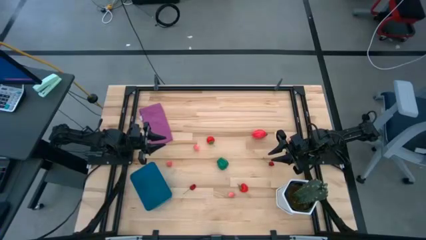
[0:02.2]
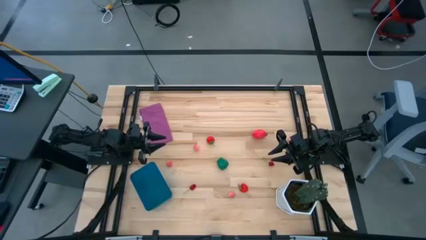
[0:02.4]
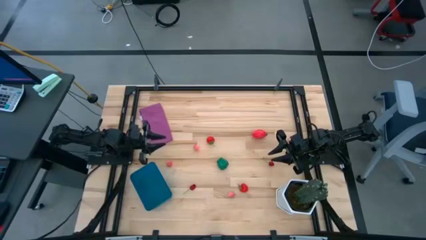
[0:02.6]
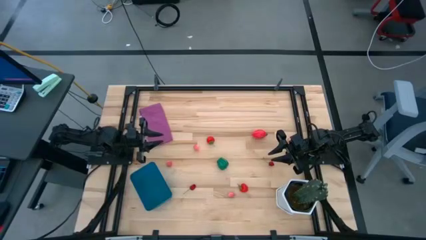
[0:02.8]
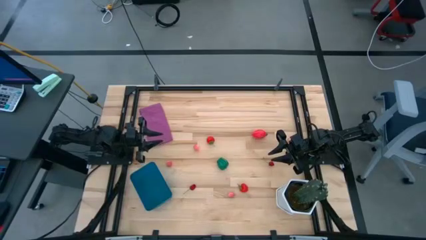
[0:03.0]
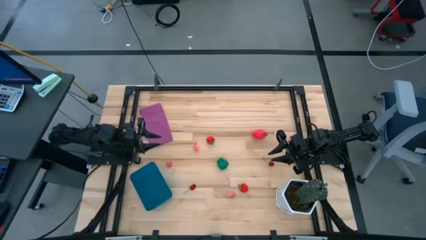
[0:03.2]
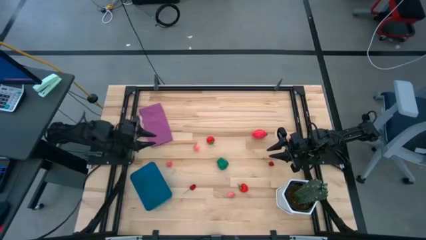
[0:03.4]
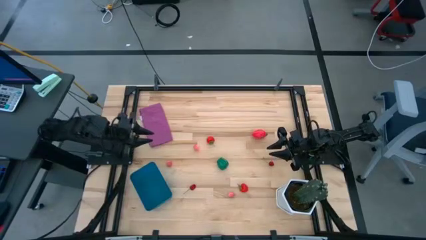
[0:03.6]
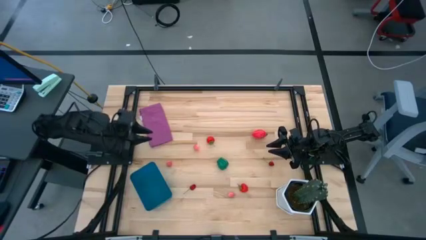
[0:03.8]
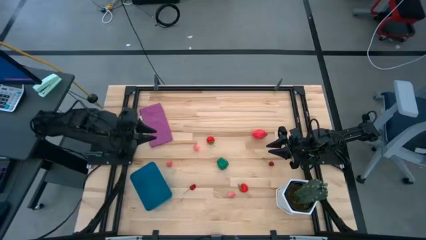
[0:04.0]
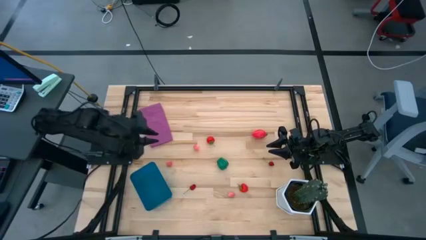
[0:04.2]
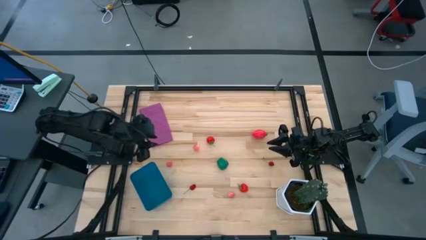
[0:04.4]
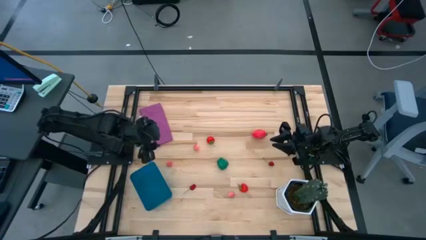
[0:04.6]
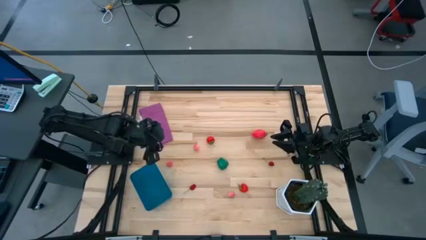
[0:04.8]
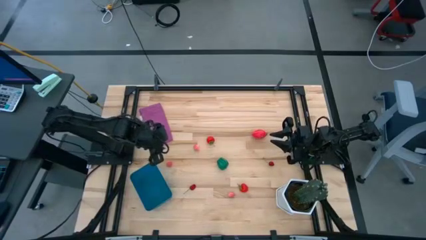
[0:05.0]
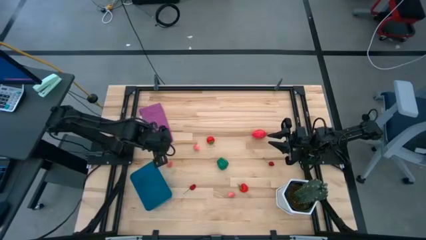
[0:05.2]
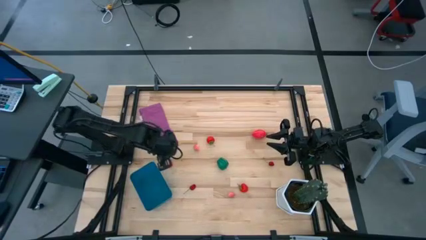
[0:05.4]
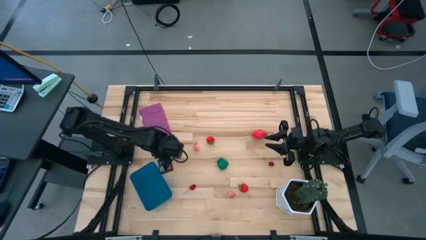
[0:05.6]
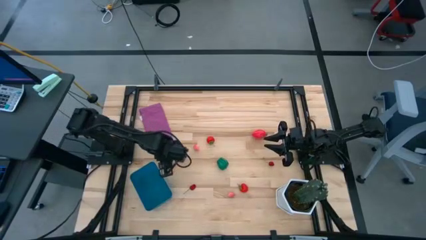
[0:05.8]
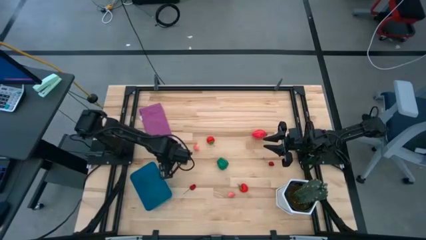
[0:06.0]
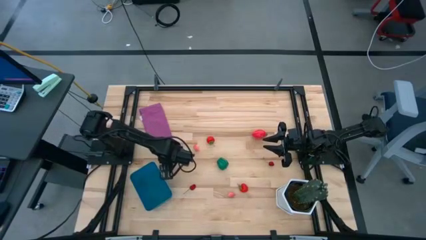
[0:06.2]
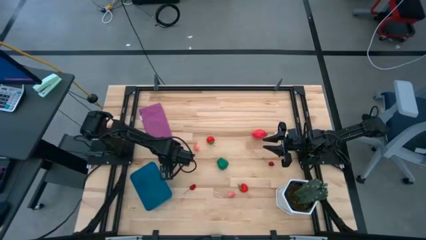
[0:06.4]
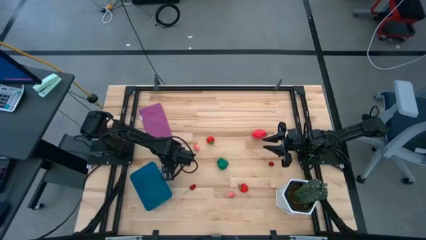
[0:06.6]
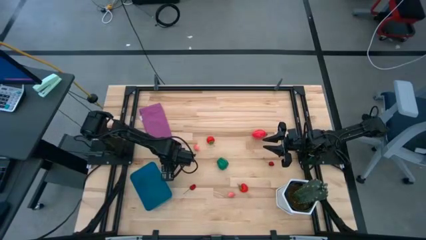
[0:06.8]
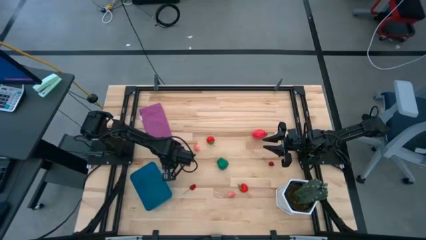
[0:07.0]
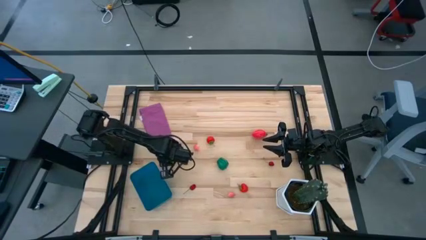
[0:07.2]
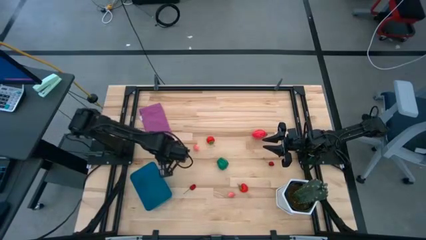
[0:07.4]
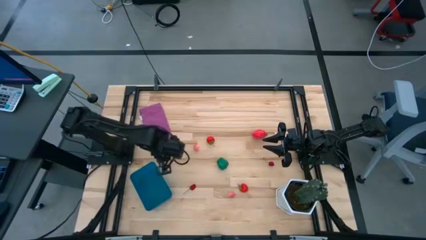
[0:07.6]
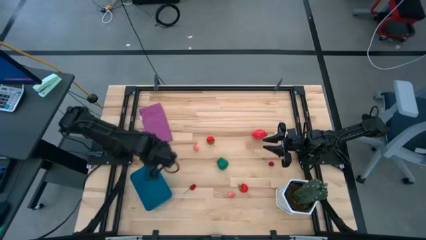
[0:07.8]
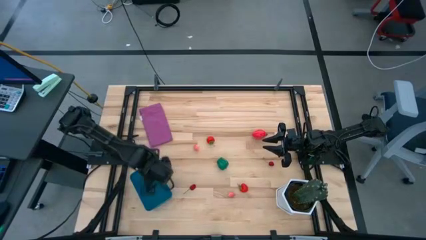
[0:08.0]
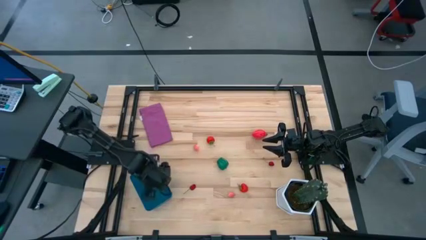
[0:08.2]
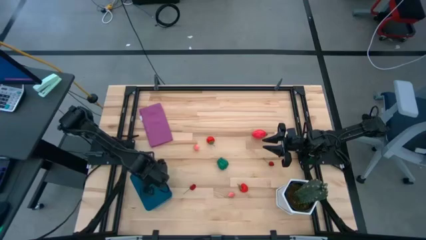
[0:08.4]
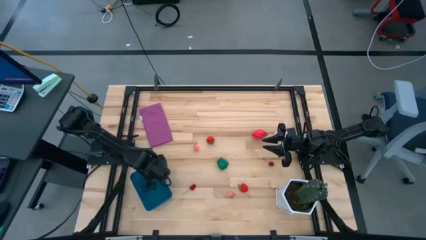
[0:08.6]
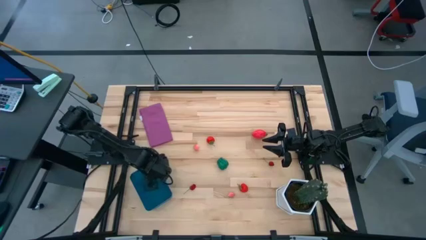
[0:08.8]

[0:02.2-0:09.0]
Task: Pick and placing Produce into tupperware
Put the peach into the blue bin

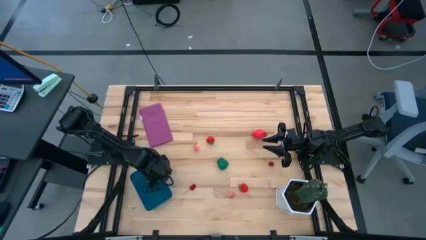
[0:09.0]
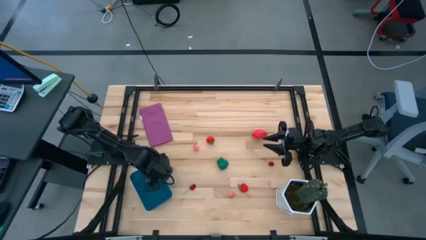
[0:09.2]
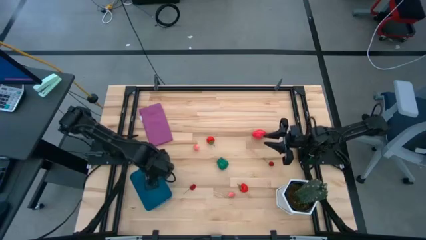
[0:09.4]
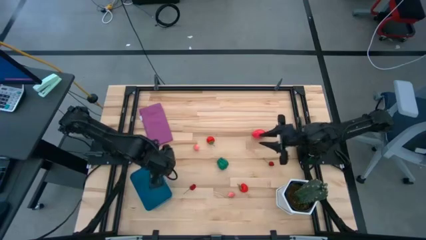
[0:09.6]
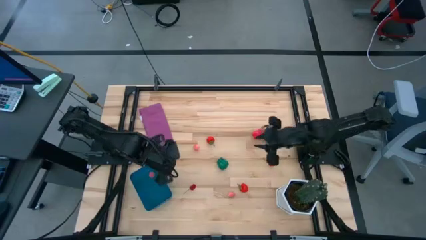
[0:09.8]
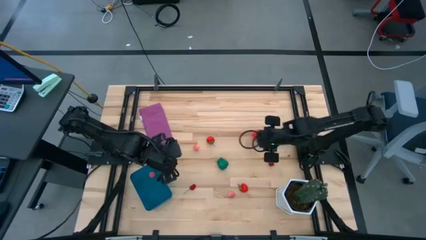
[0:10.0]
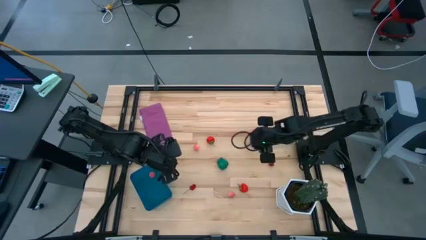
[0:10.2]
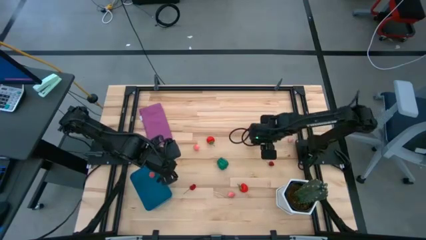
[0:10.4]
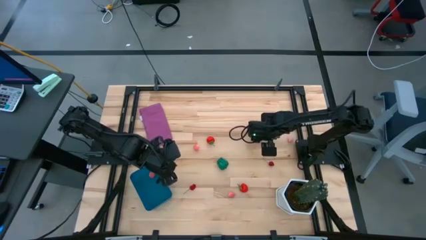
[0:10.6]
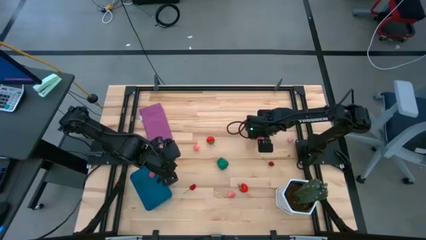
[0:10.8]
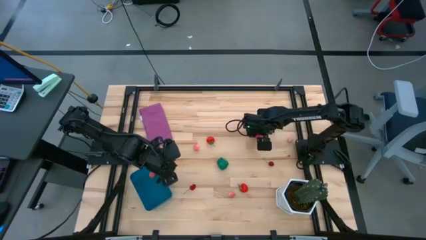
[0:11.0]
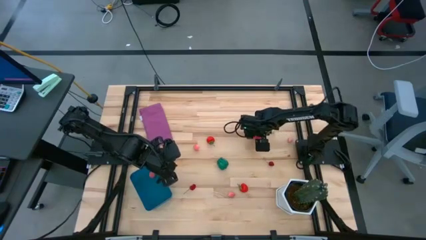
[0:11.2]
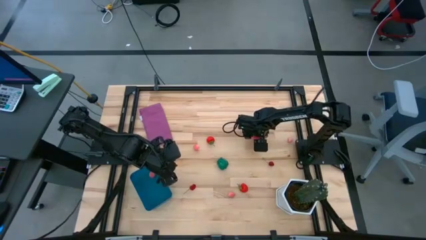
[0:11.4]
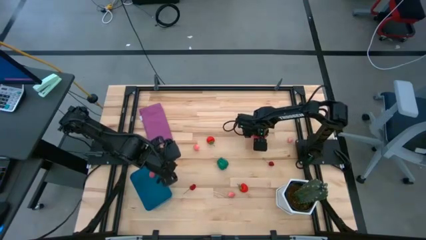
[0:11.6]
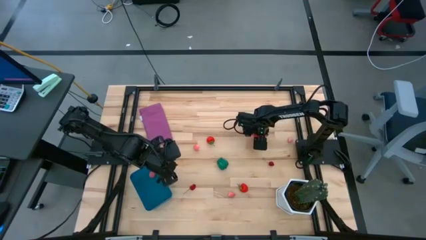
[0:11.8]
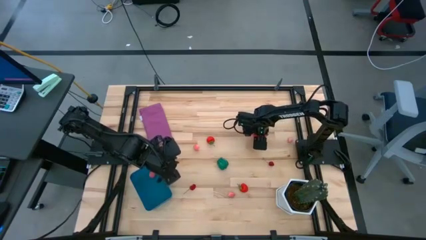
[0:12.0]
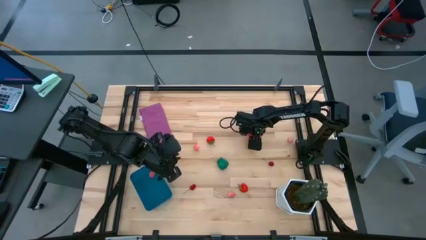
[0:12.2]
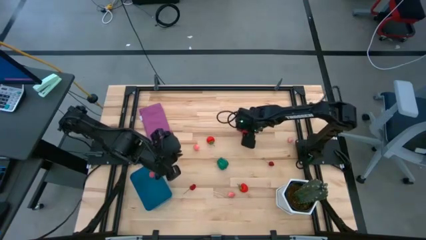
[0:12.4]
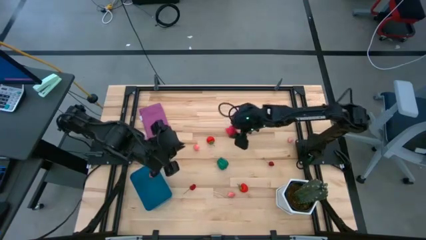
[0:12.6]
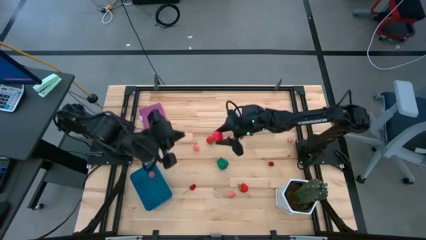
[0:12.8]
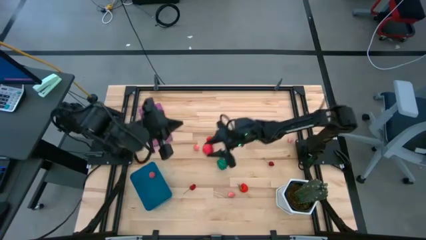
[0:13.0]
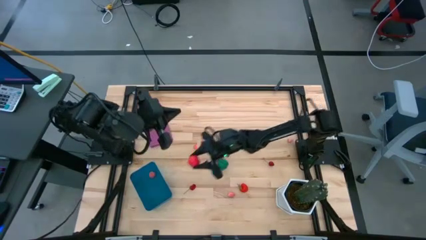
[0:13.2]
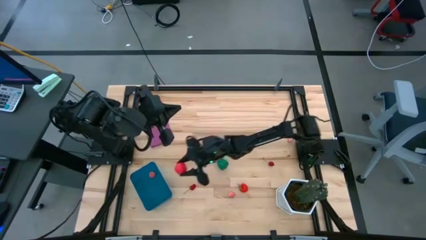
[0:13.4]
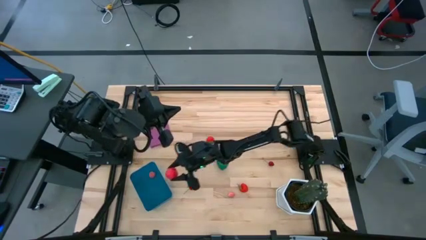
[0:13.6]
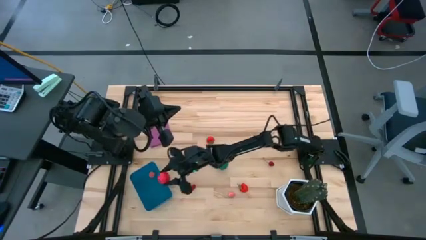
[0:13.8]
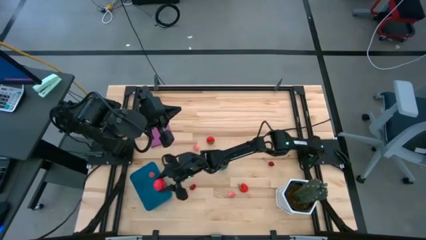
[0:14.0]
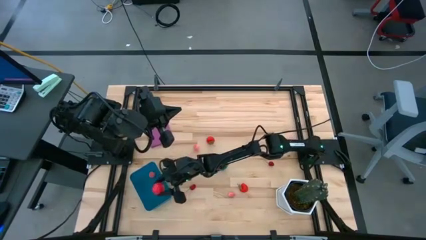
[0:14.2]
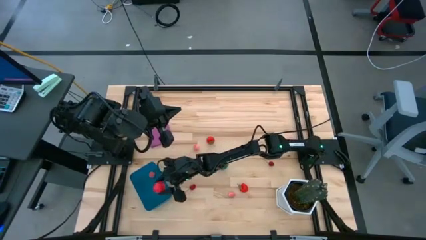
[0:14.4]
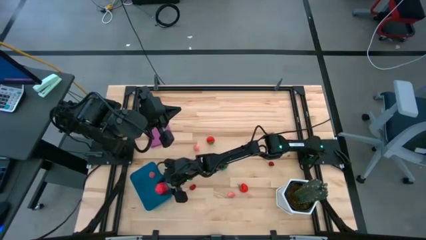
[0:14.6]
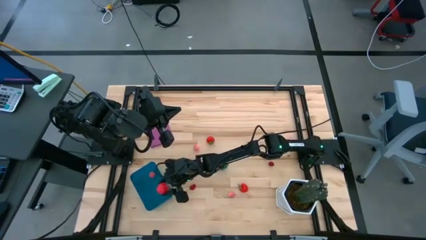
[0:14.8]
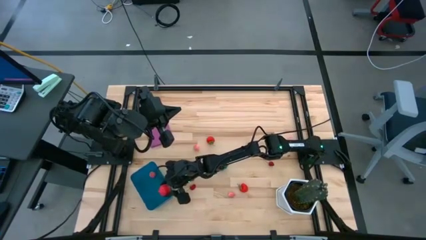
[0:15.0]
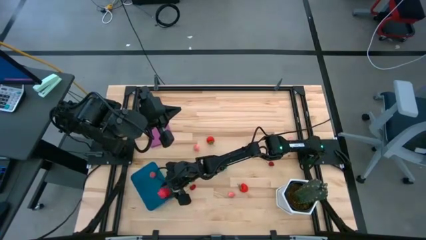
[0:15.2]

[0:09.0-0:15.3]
Put the dragon fruit into the blue bin

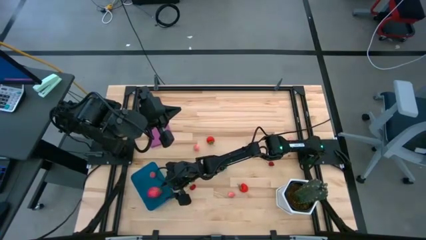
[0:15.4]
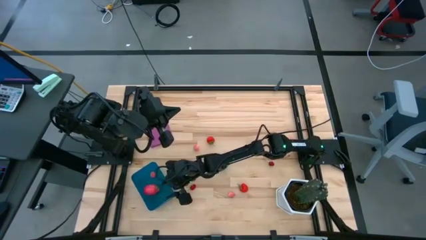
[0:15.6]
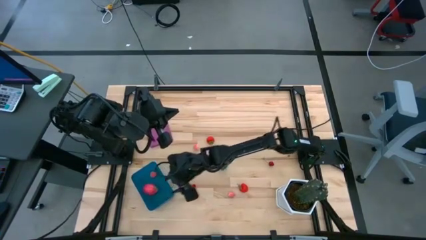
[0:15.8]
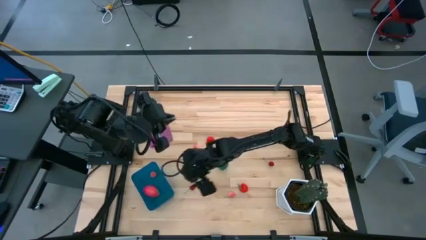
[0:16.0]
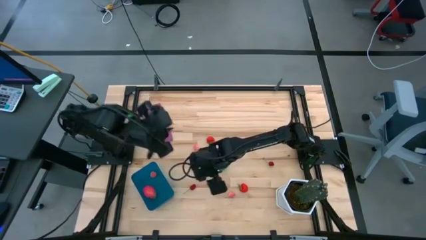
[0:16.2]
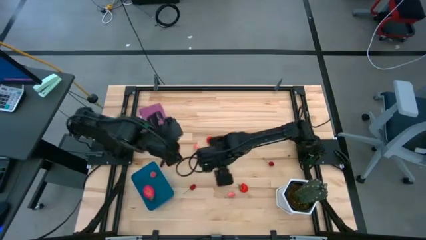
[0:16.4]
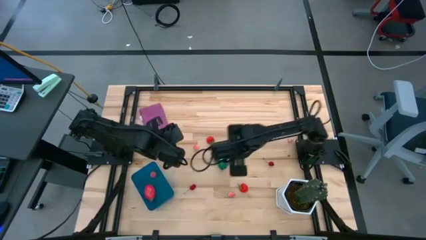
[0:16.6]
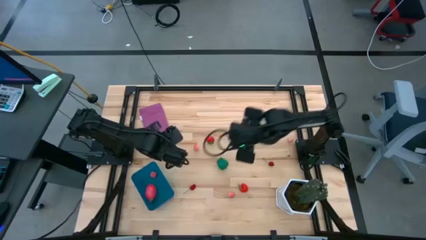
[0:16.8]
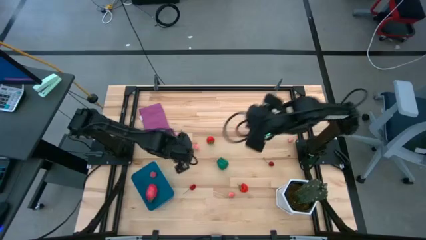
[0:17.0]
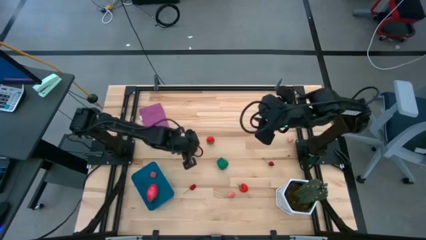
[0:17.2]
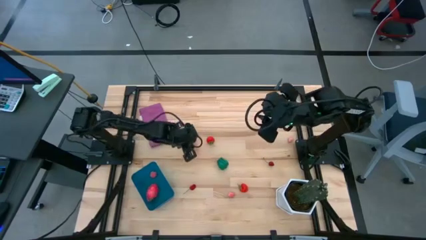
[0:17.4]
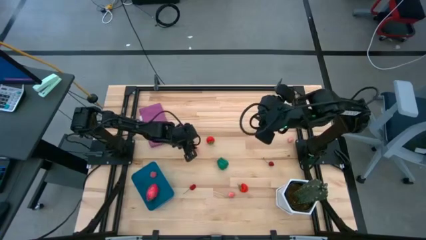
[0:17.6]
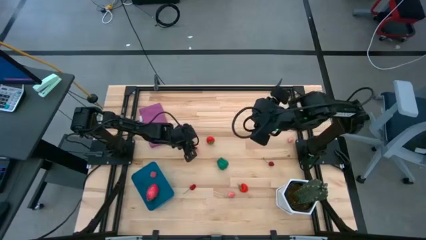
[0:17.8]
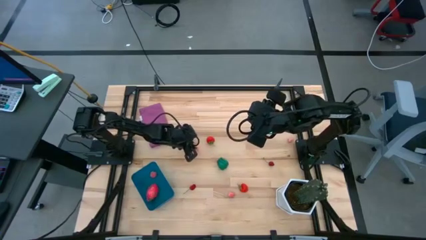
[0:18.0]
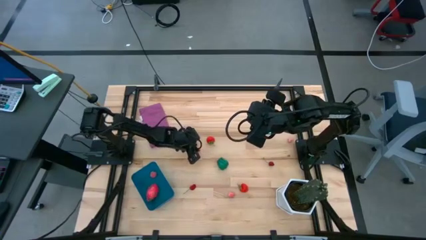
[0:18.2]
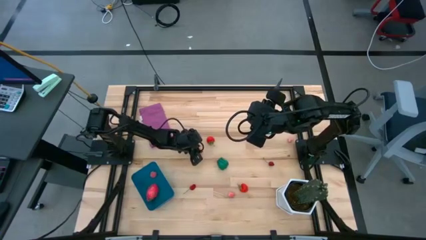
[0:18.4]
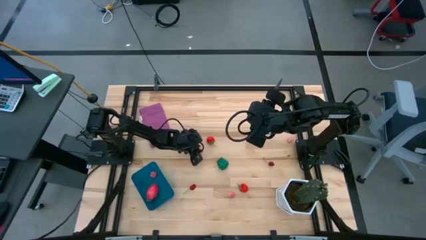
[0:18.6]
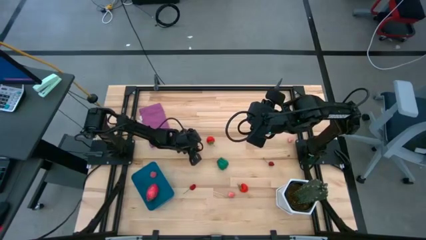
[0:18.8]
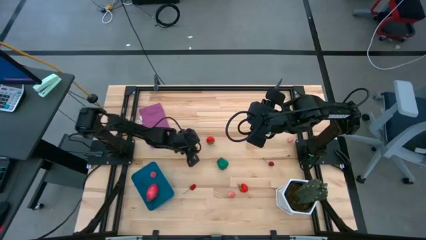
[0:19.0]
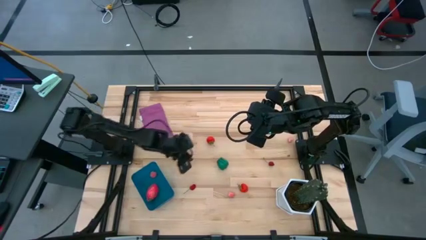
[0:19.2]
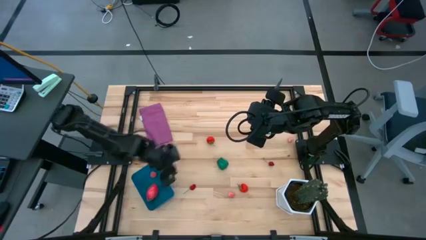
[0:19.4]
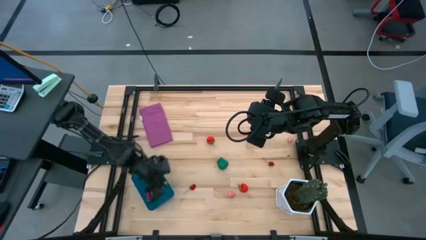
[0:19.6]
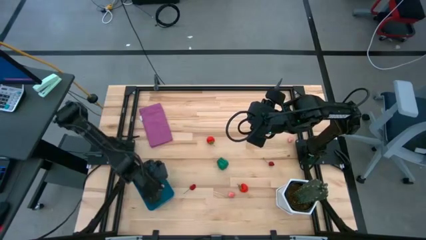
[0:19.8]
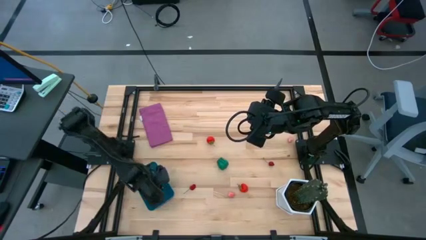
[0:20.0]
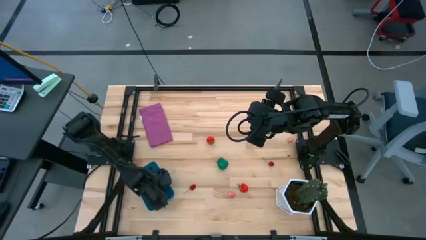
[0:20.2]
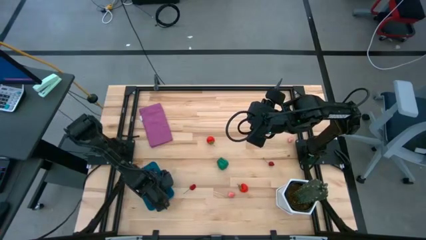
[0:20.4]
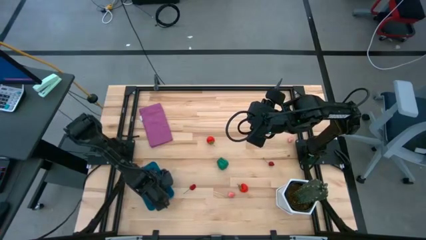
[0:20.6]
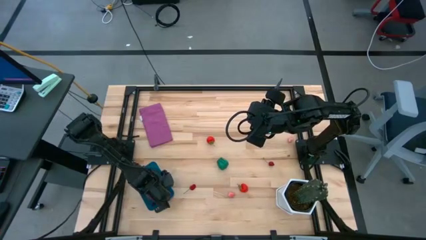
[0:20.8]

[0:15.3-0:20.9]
Put the peach into the blue bin
